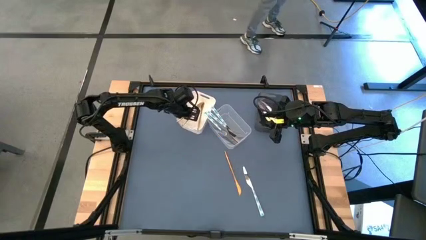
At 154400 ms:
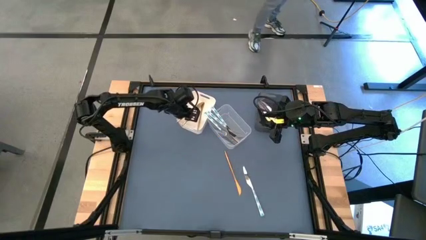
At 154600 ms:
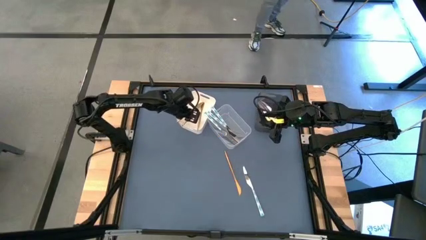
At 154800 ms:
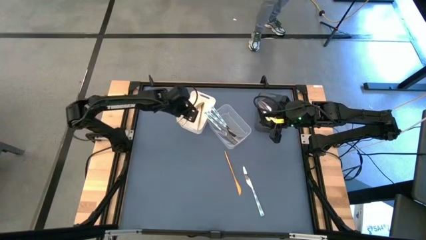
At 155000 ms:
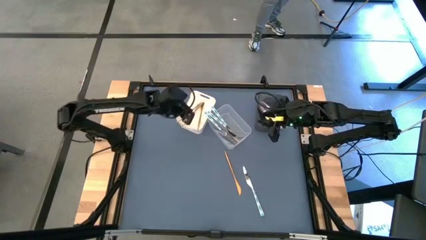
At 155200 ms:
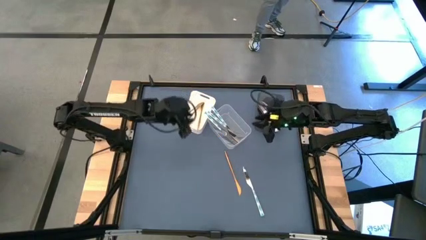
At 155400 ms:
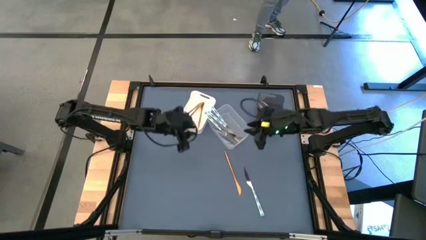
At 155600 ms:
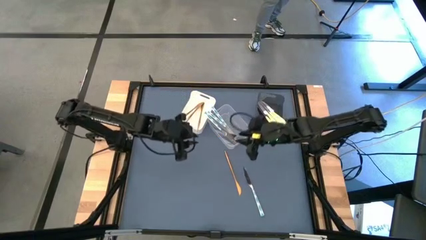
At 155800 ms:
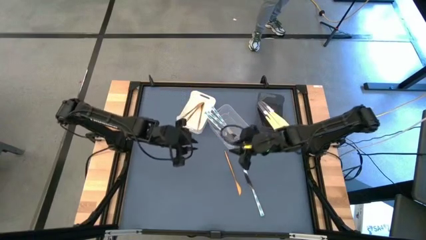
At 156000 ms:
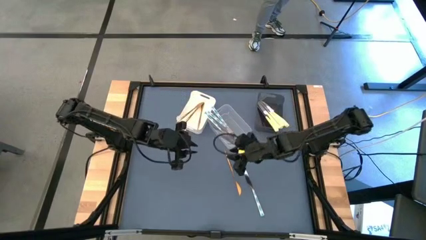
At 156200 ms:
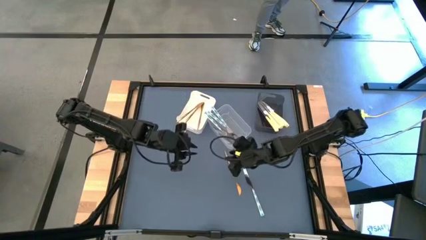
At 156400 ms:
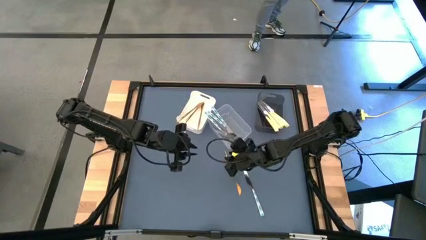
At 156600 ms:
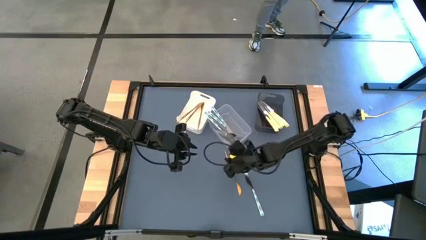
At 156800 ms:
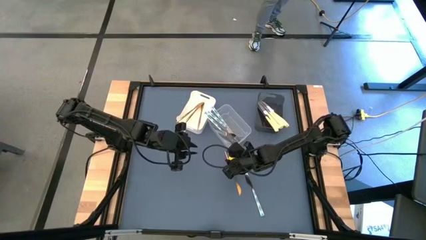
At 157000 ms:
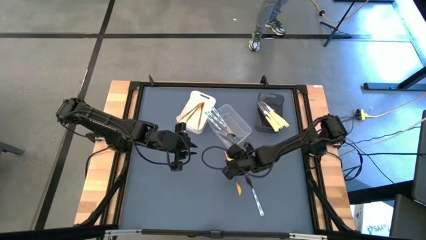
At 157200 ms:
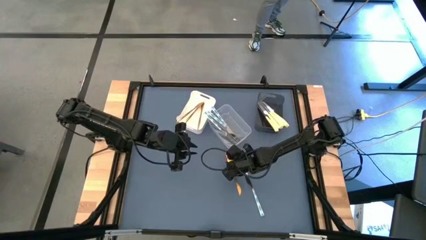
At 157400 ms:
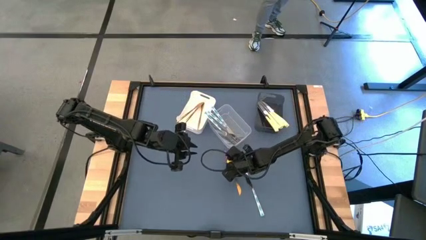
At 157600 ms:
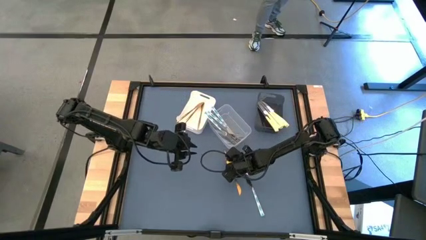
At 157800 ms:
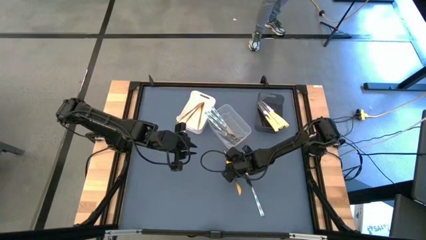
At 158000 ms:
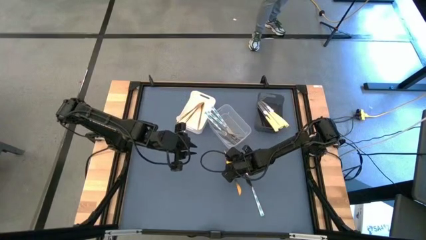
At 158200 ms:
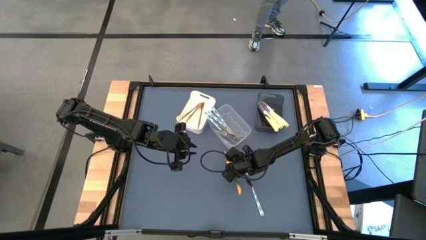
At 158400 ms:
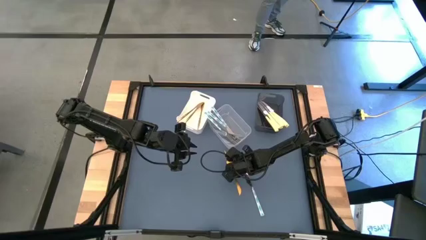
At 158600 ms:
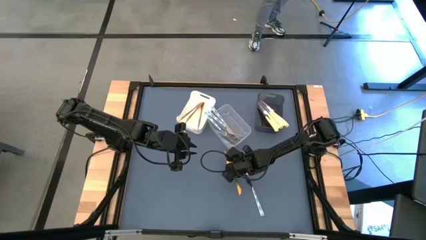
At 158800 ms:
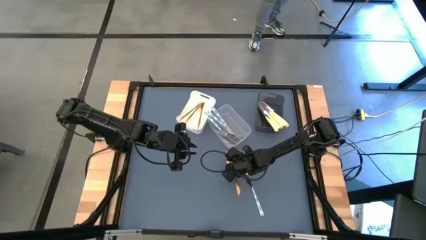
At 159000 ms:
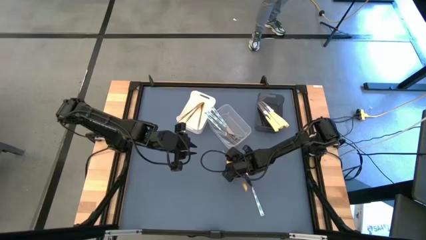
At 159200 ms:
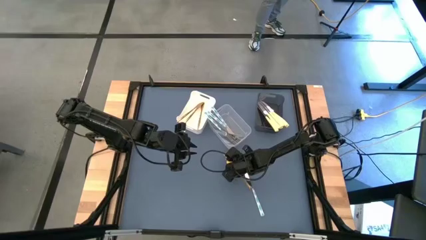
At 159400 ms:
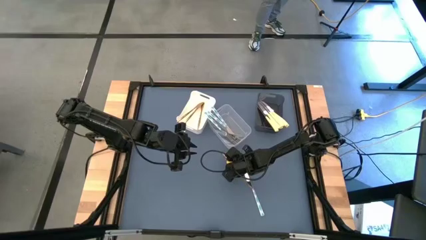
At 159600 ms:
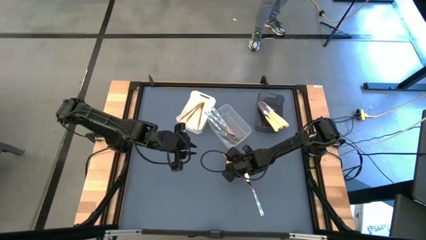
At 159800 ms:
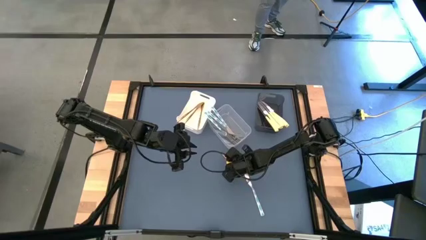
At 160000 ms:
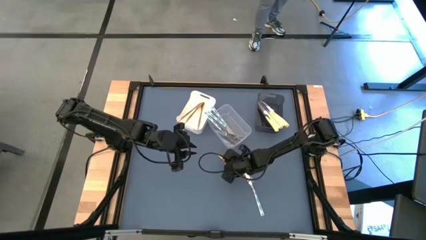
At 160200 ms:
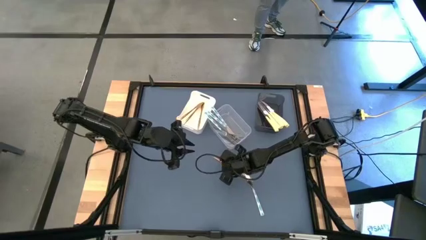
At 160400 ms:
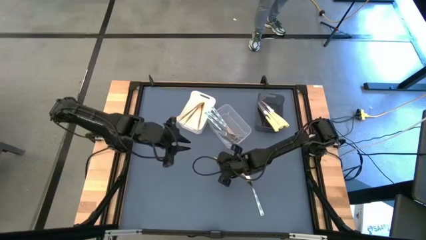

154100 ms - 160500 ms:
Task: Sort silverware by color (type)
Put the gold knife into the white bin

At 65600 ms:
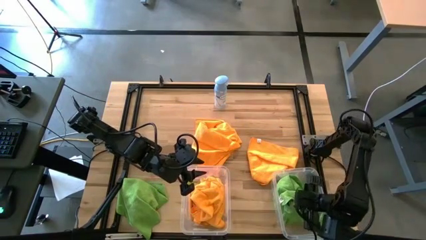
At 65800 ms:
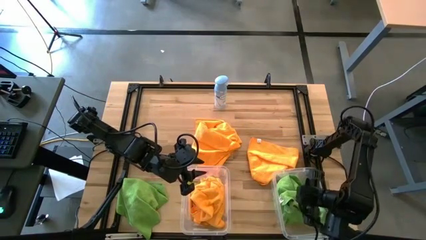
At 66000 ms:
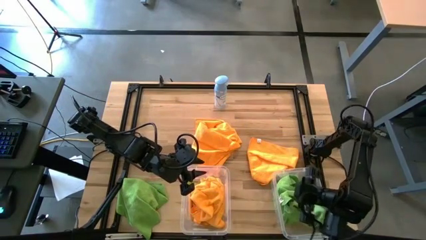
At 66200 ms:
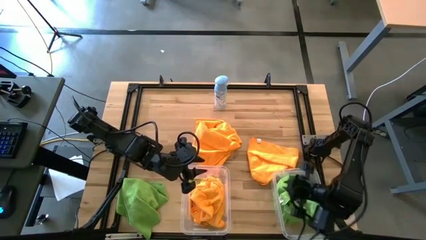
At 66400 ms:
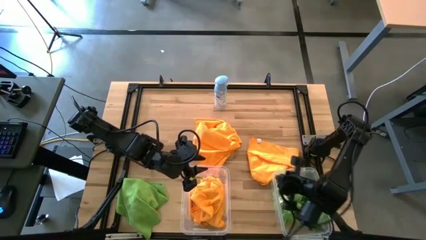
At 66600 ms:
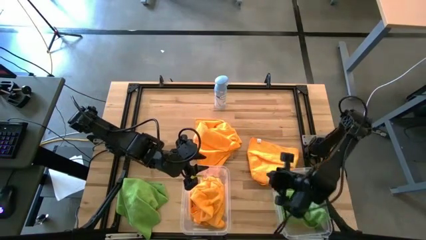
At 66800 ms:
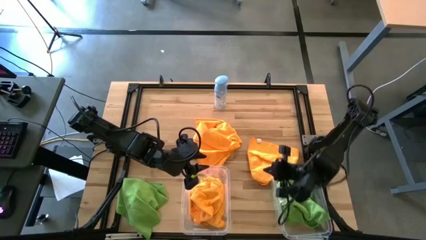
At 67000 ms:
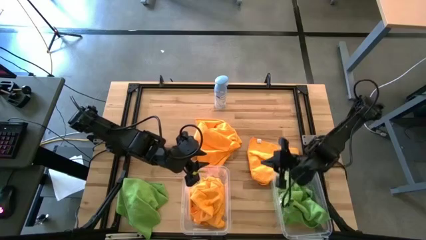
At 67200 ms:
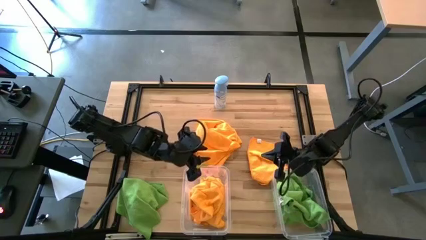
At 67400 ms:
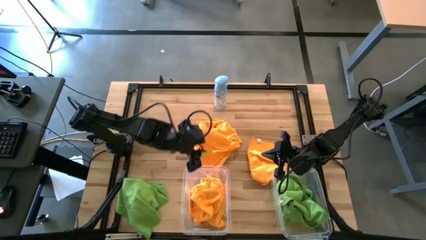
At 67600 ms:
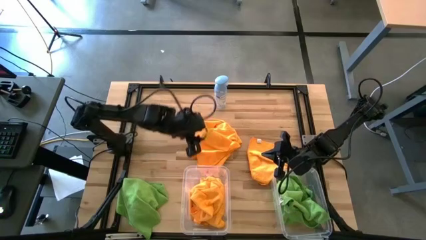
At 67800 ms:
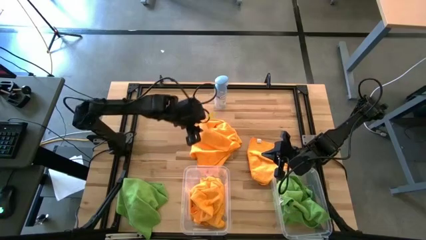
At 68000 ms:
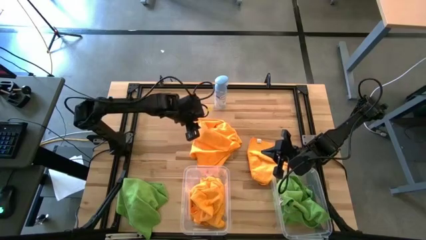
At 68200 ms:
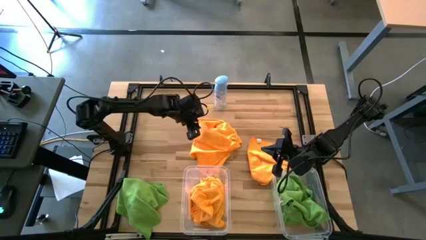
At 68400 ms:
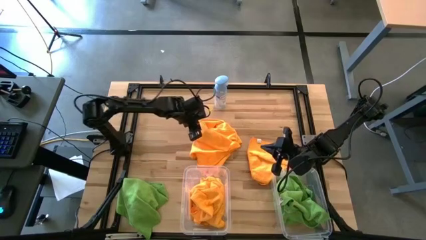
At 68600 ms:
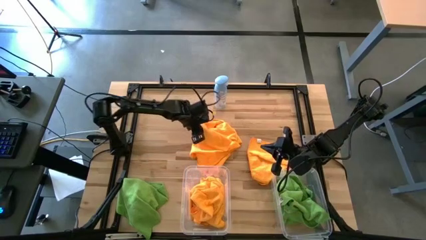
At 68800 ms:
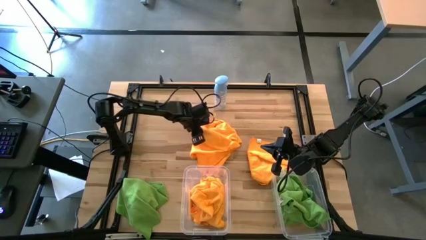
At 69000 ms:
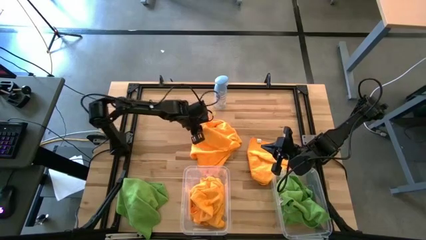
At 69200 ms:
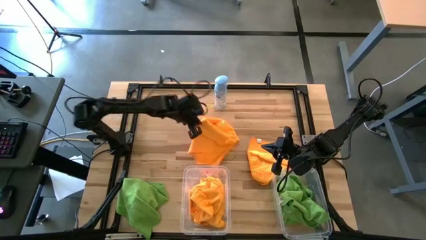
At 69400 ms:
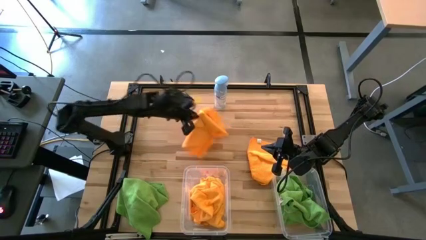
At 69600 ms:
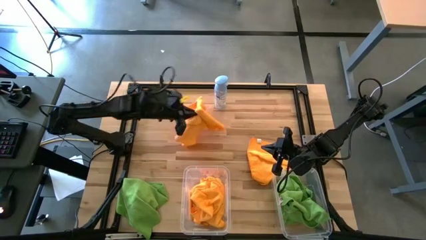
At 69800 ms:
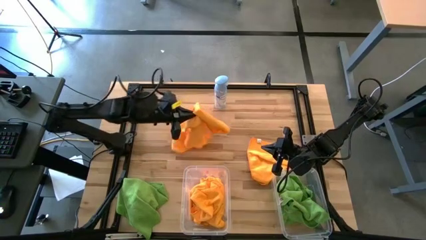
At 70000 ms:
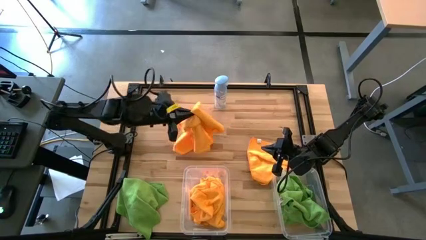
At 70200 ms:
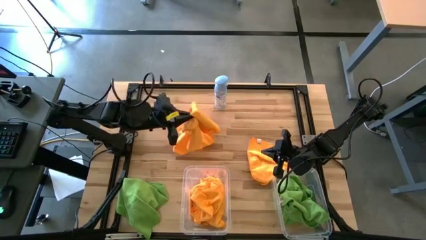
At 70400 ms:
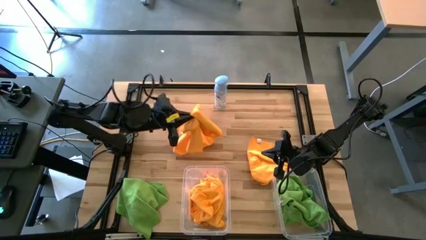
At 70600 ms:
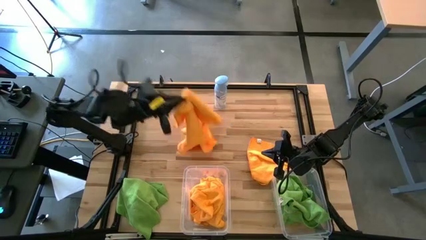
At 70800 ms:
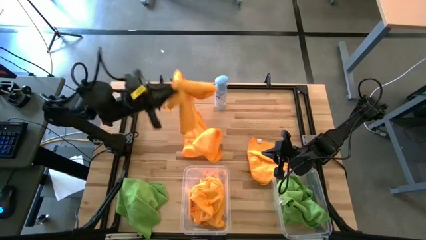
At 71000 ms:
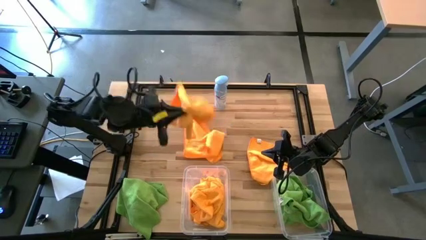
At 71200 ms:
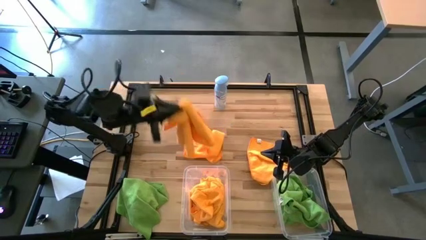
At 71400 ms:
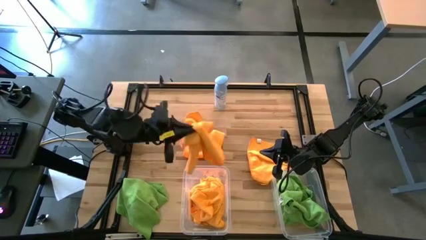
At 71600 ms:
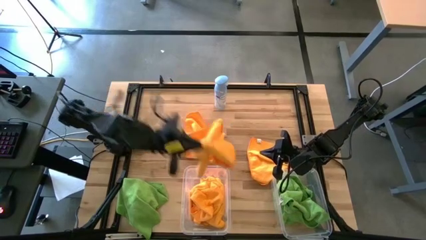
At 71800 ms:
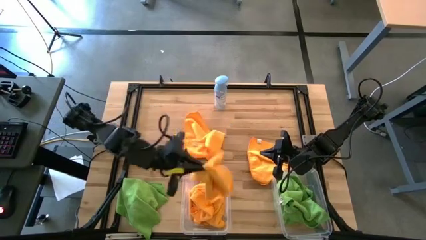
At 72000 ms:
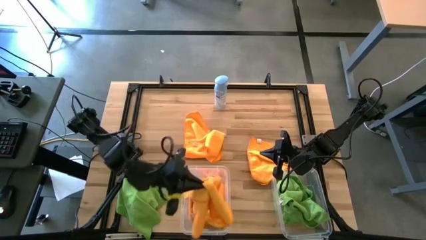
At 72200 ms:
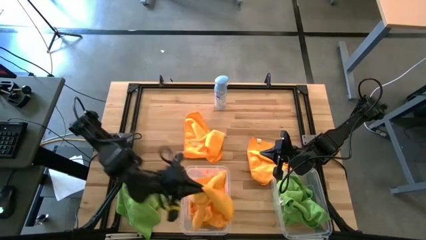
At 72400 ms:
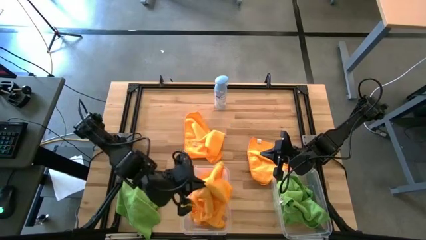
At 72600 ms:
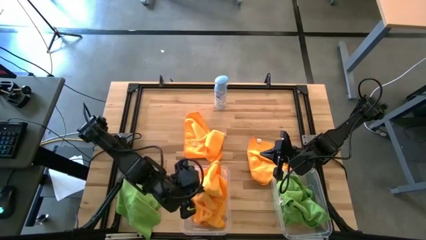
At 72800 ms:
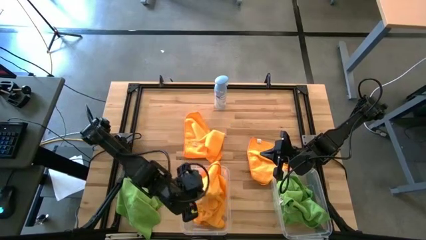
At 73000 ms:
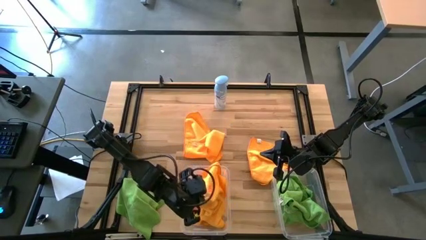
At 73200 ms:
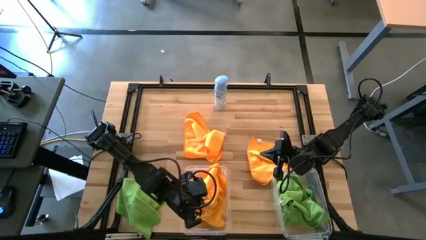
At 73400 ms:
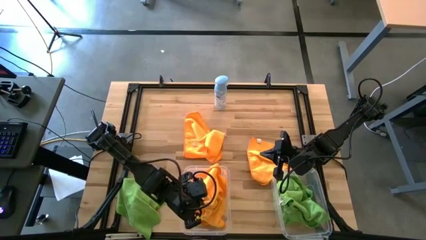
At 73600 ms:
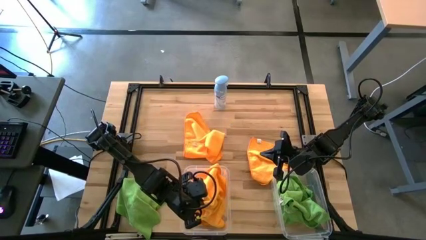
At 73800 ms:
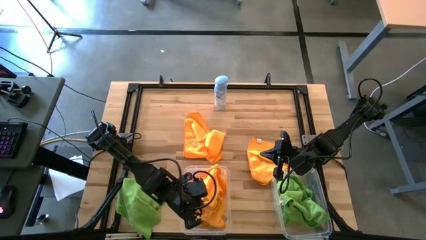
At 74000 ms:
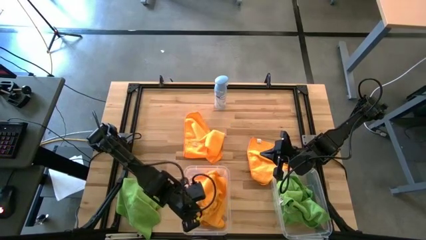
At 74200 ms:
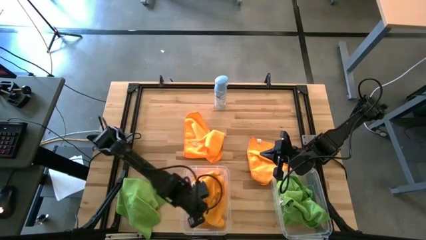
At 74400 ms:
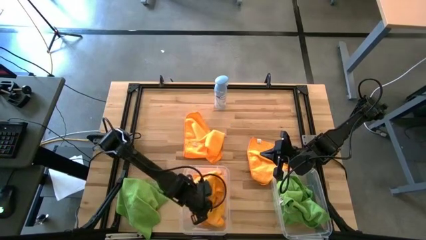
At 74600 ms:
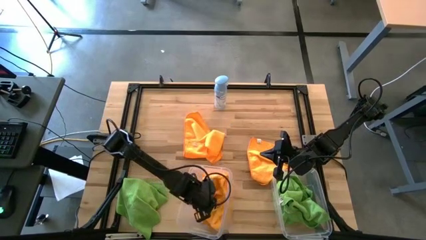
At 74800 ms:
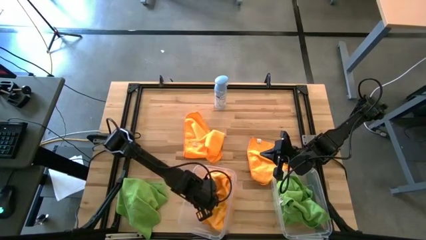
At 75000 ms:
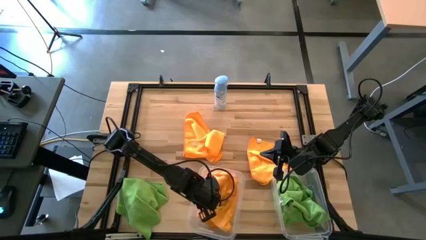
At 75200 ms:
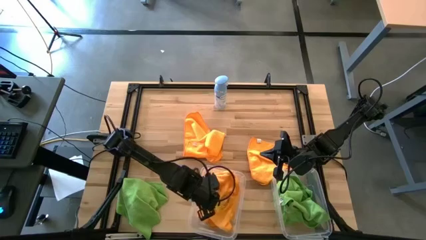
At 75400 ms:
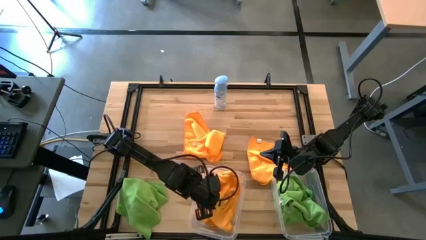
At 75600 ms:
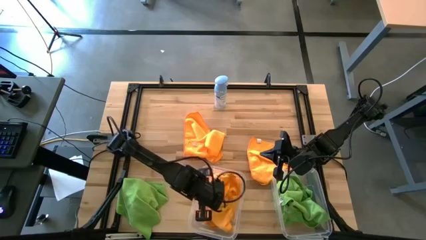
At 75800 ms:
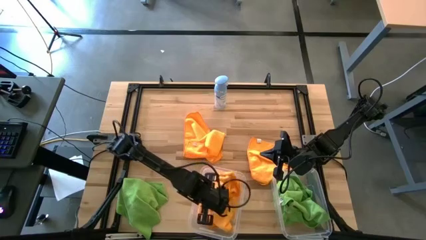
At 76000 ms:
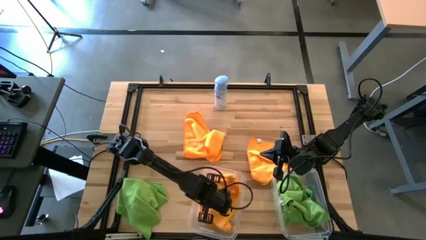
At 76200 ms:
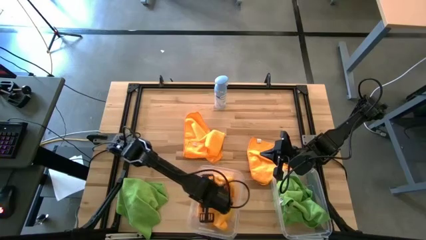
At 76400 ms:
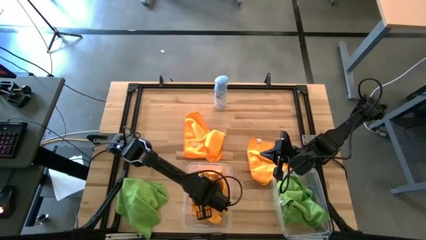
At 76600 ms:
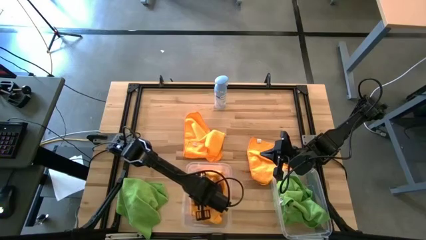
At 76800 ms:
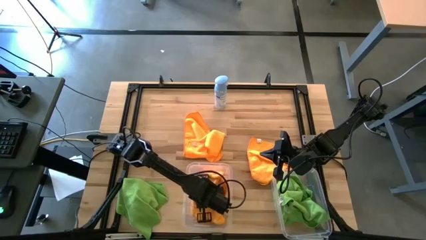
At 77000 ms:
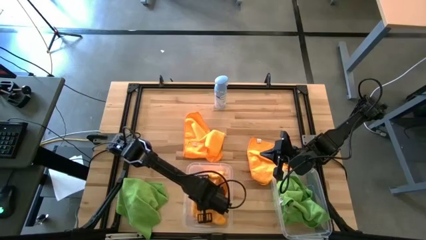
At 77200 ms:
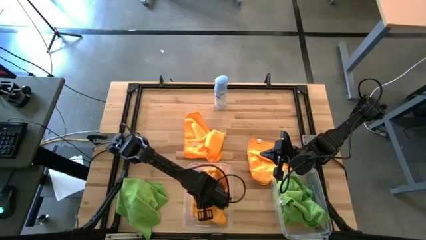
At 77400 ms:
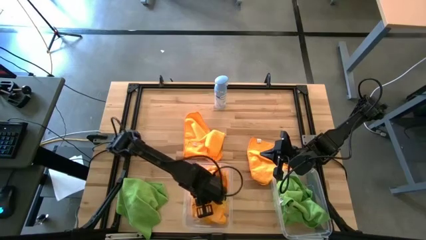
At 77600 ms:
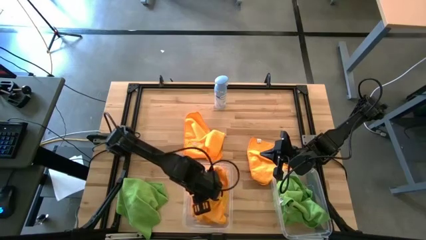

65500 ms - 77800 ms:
Task: Sort microfiber towel by color & place in baskets
Put the yellow towel into the left transparent bin
